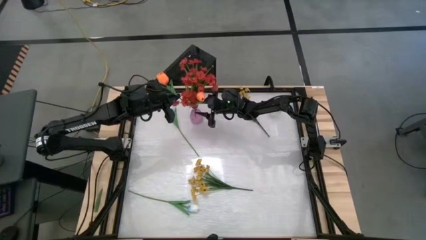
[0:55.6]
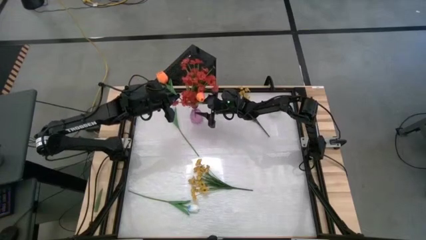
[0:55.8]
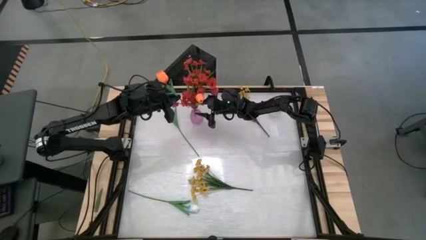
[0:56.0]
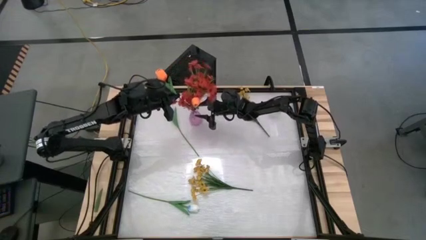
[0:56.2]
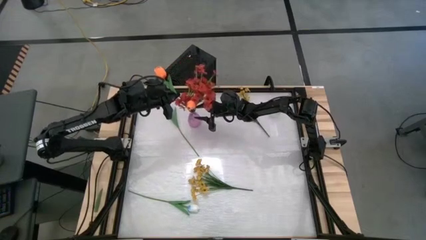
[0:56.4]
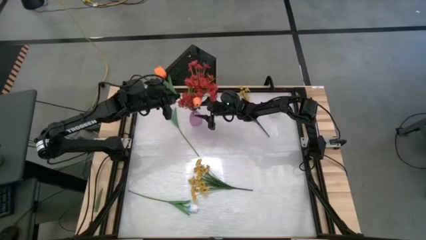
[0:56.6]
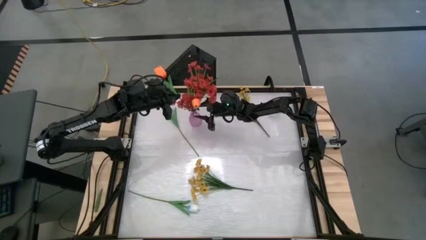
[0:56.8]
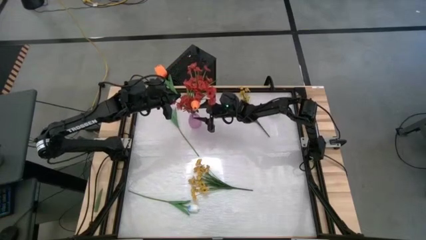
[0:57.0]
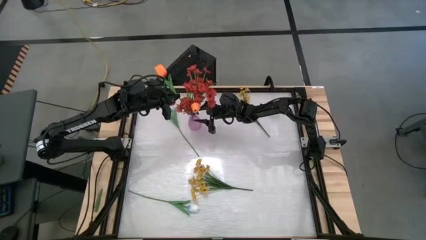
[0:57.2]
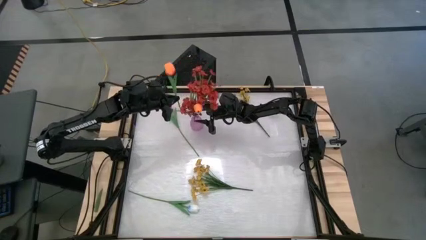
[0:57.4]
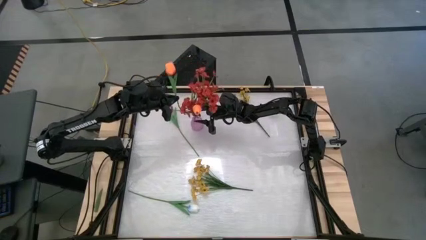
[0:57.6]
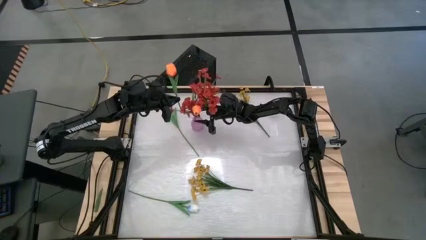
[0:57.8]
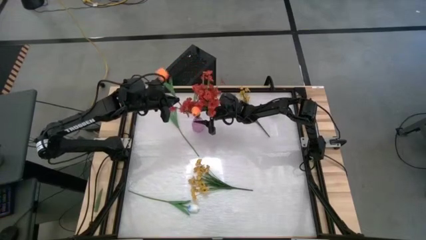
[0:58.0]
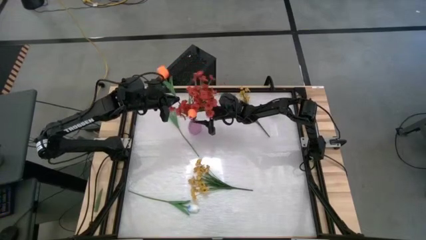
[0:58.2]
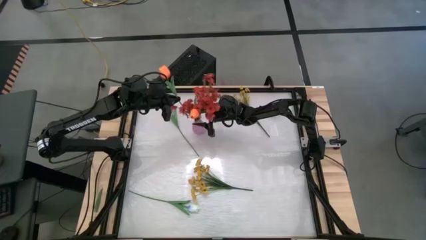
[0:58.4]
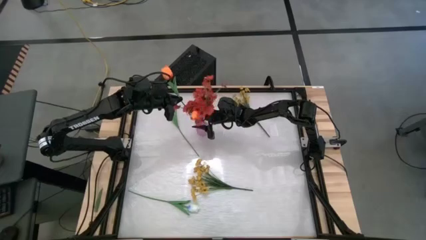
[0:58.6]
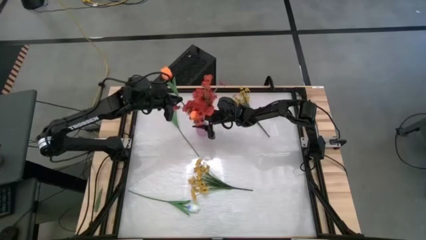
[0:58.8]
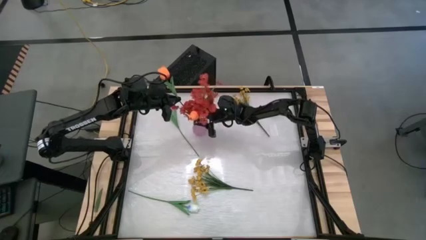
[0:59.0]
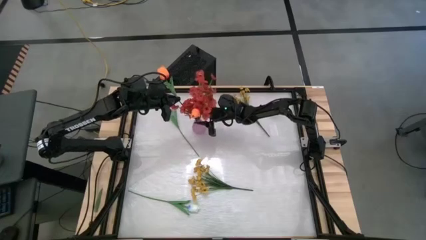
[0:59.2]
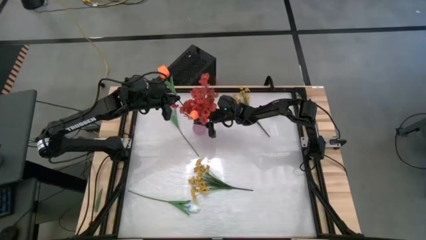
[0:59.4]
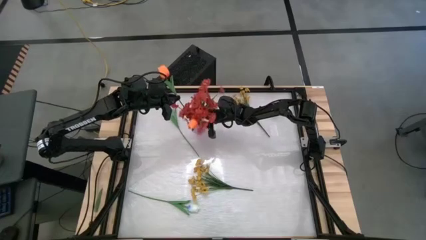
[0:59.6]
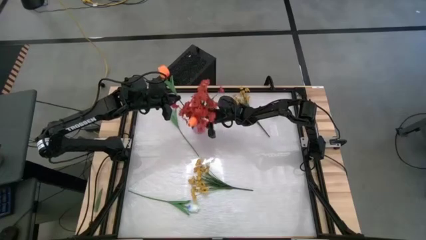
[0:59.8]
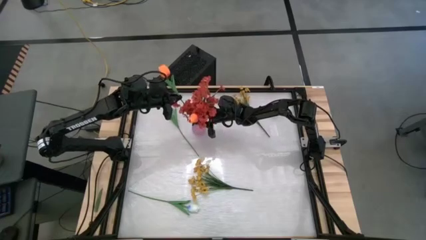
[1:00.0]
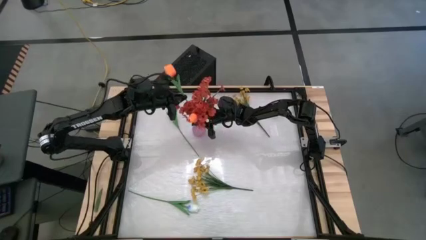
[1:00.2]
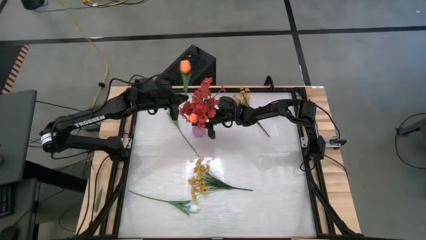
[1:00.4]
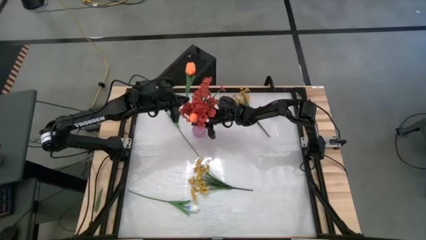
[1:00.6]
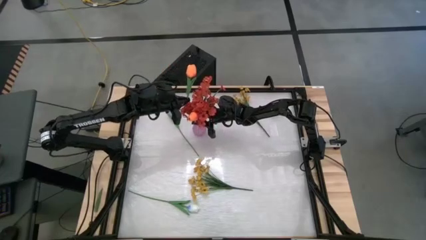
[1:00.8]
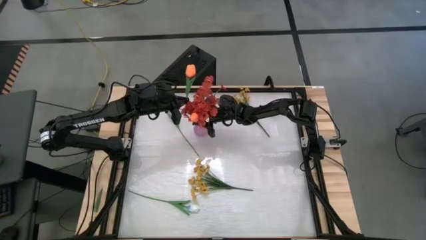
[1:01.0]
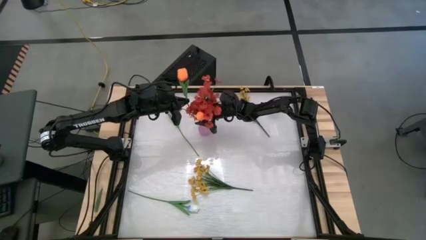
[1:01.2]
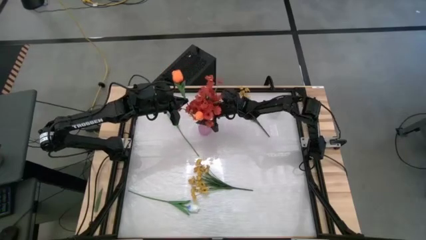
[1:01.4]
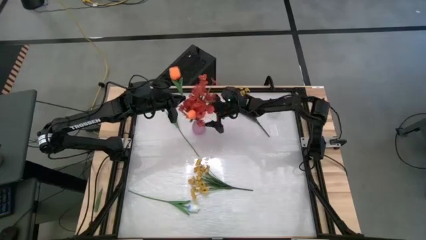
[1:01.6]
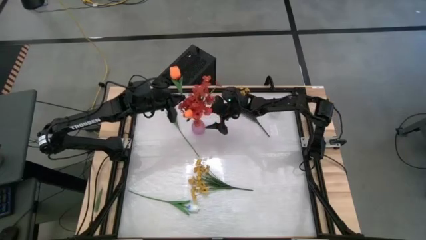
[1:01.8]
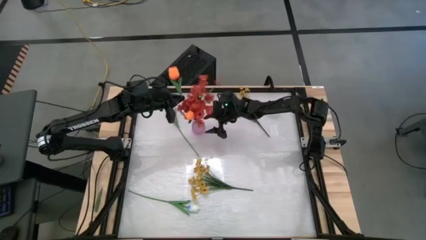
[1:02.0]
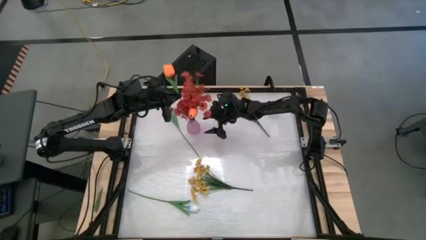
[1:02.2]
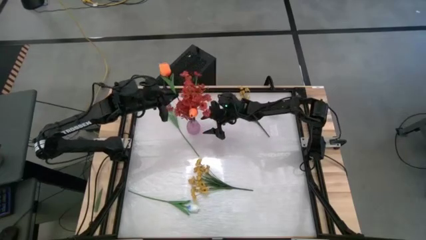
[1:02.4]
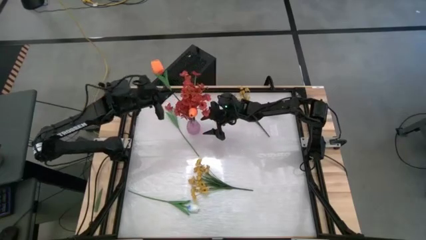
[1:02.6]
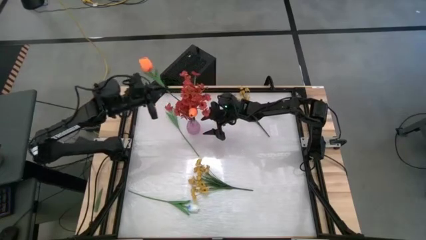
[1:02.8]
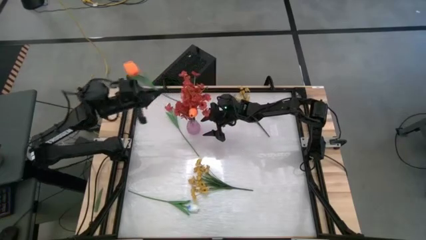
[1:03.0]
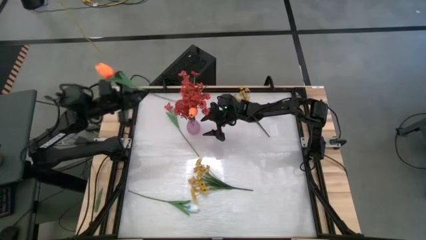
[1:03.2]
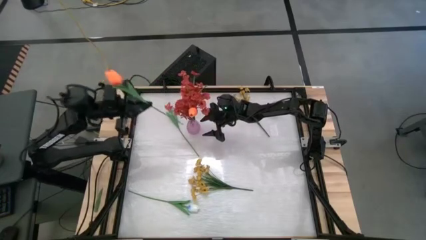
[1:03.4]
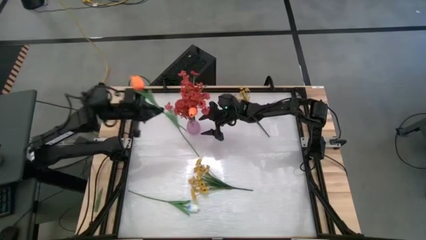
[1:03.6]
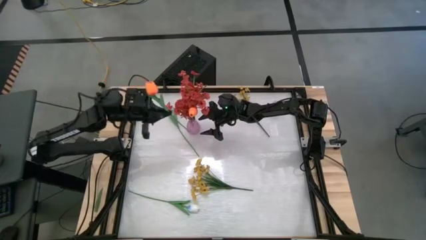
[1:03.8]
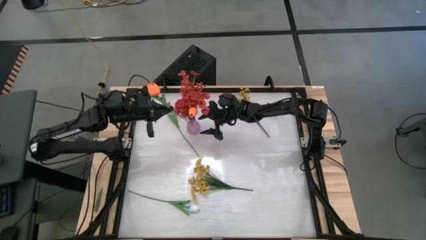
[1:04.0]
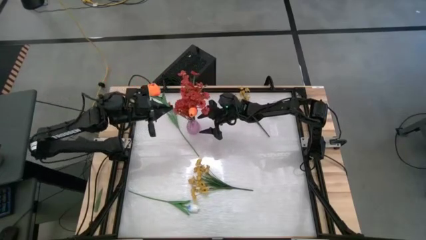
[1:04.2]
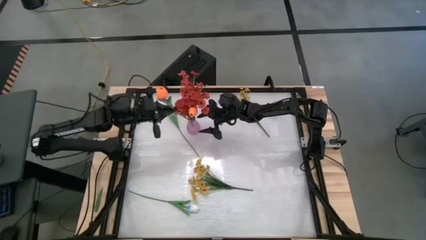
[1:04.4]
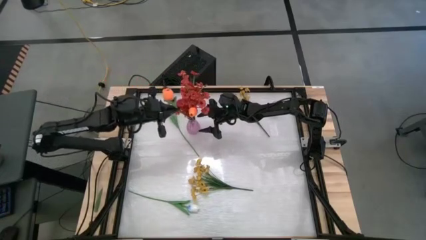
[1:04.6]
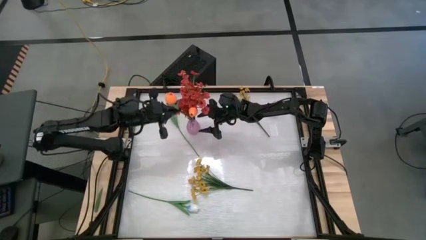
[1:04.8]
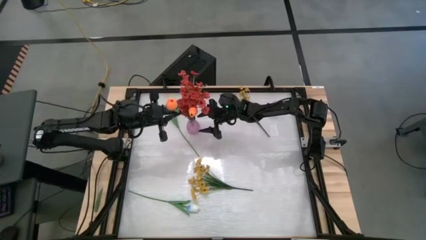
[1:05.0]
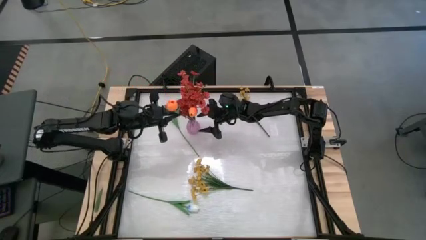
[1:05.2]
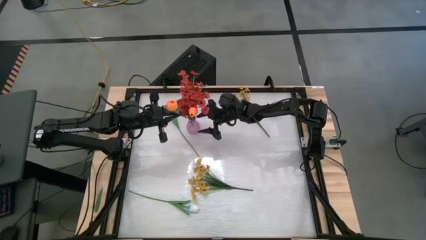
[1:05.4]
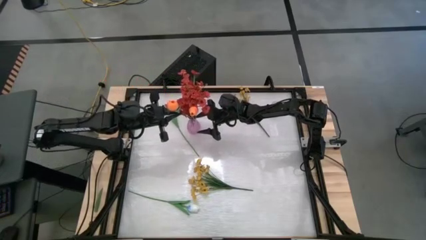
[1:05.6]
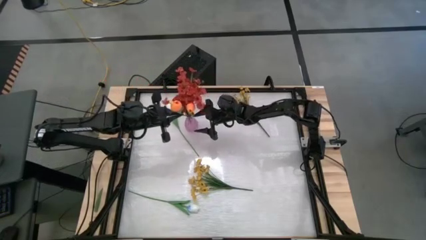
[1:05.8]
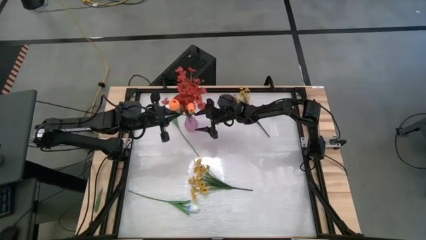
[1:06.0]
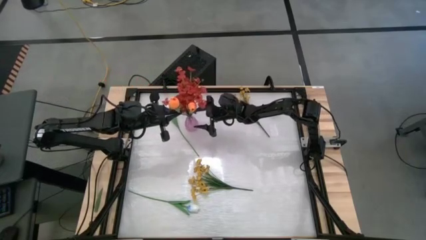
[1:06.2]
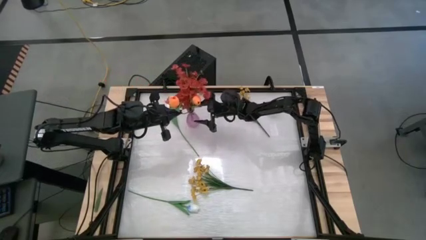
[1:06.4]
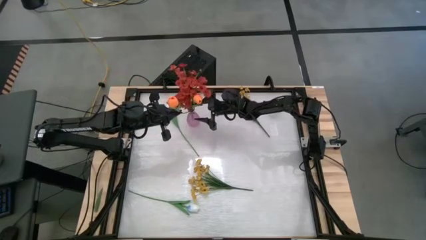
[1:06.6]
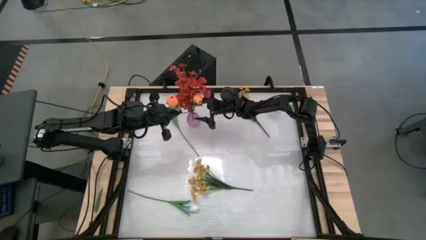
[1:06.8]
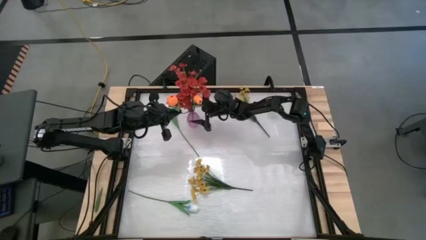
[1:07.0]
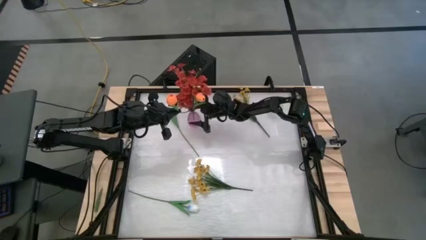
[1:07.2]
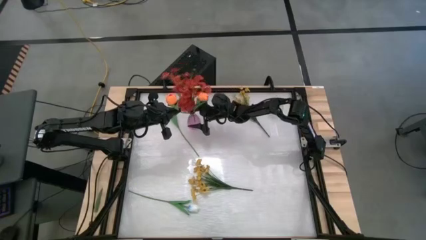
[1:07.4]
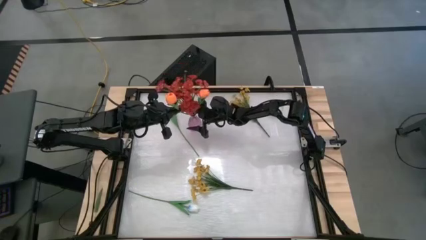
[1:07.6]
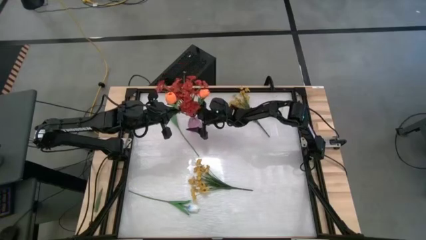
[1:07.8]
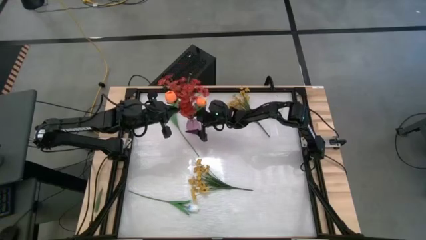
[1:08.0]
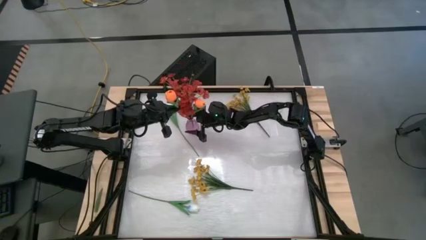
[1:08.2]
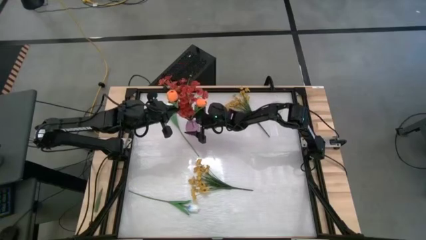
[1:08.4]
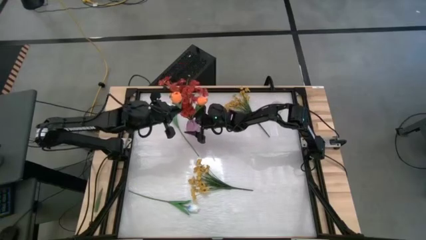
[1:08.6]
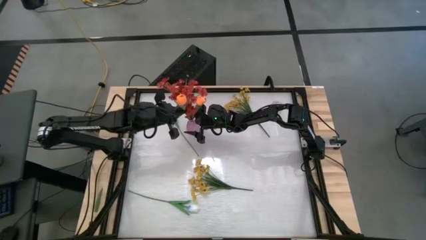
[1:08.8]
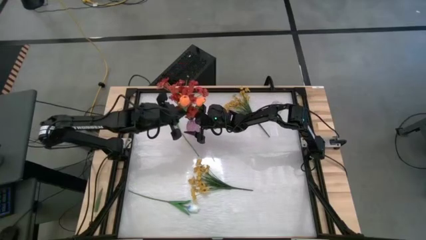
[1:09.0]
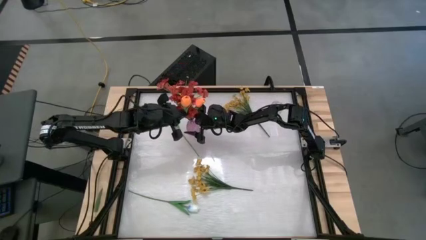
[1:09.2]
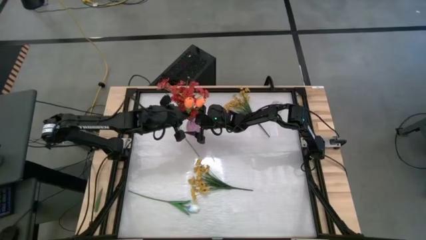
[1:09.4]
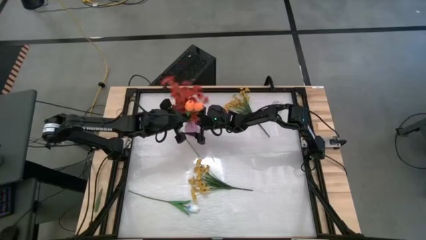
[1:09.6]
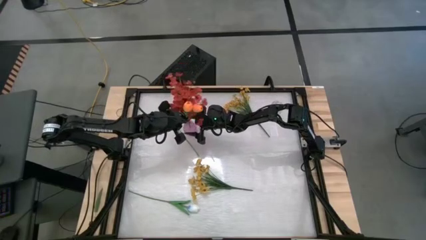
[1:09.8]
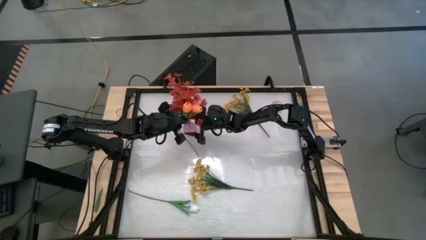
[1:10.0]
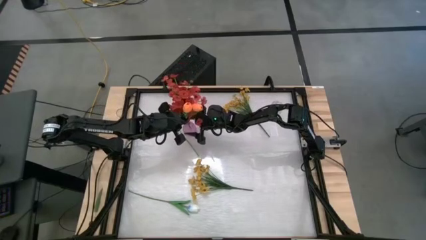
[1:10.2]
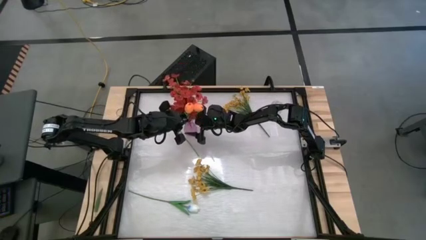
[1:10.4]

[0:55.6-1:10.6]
Task: Sort flowers into vase by color
Put the orange tulip into the pink vase
